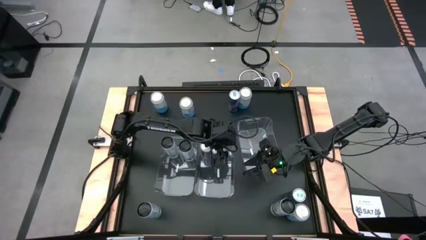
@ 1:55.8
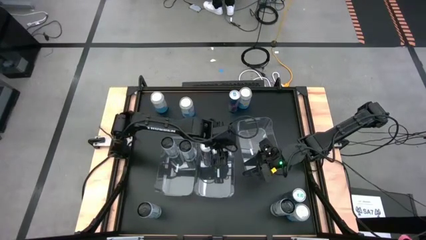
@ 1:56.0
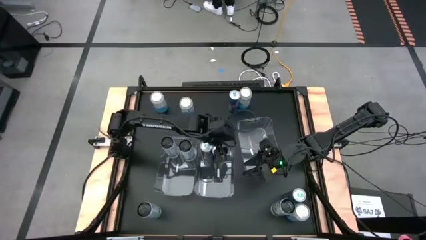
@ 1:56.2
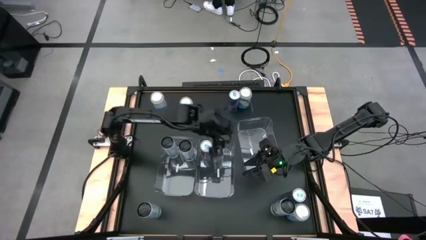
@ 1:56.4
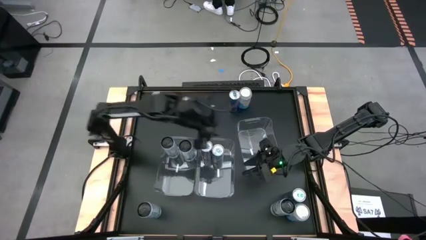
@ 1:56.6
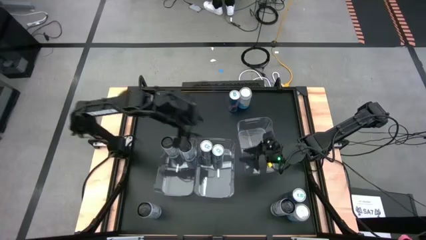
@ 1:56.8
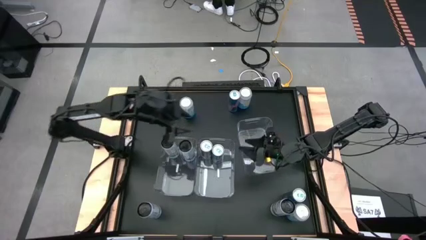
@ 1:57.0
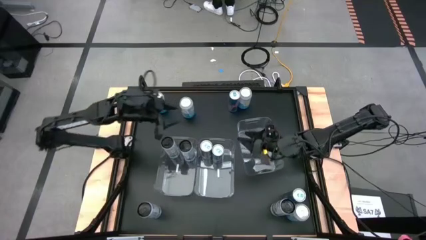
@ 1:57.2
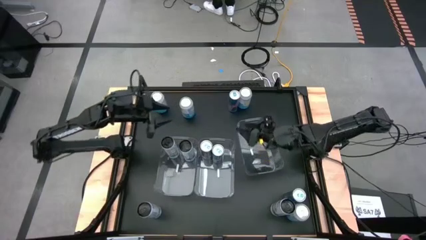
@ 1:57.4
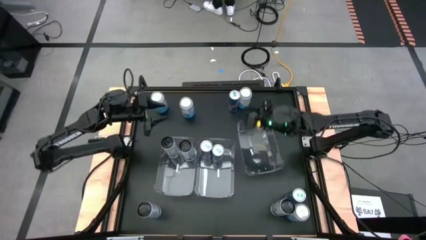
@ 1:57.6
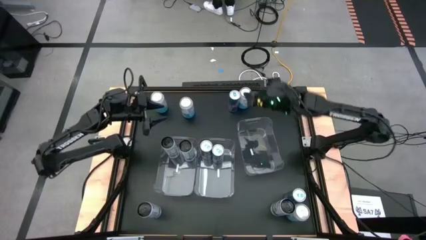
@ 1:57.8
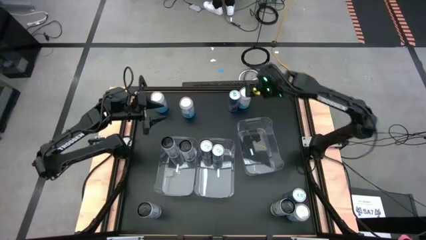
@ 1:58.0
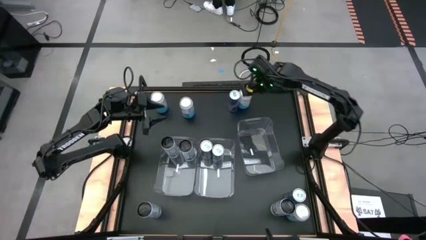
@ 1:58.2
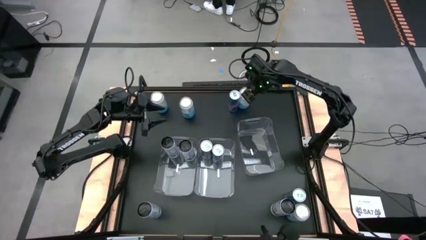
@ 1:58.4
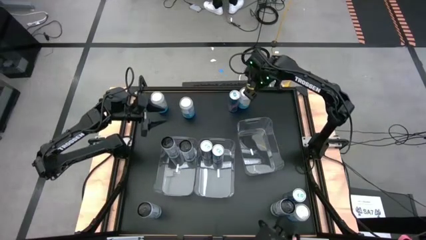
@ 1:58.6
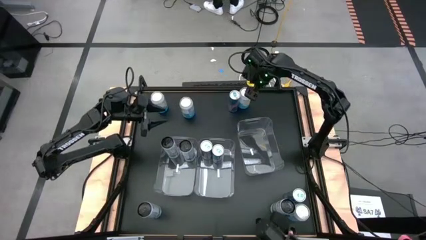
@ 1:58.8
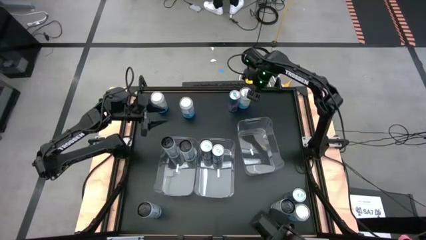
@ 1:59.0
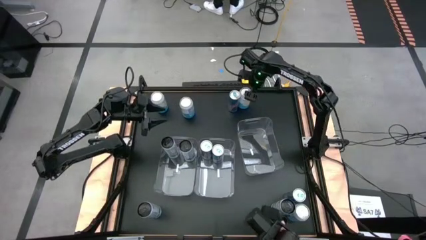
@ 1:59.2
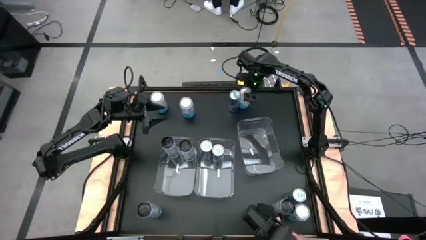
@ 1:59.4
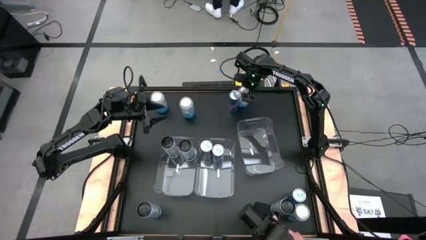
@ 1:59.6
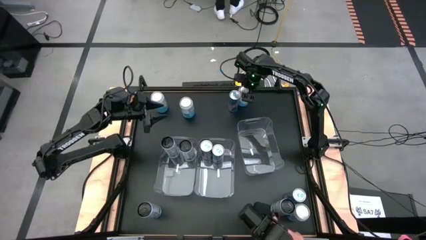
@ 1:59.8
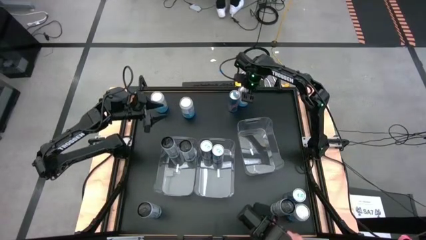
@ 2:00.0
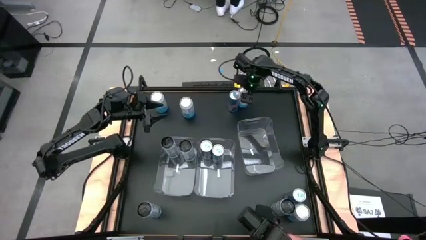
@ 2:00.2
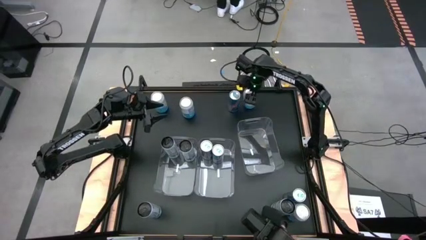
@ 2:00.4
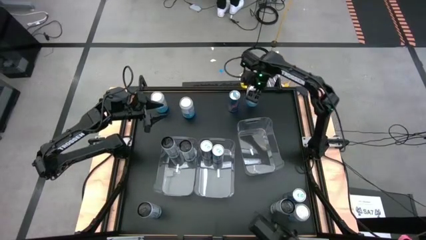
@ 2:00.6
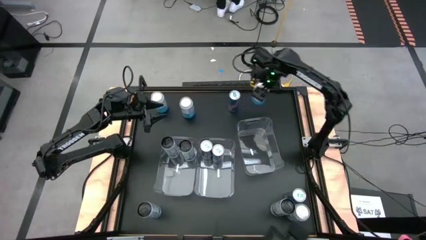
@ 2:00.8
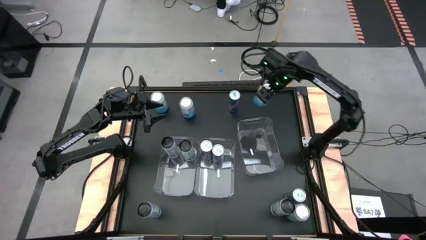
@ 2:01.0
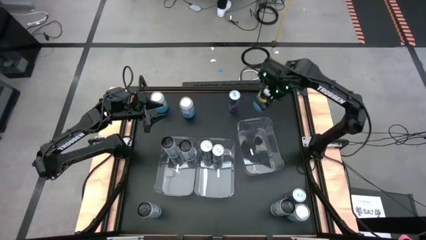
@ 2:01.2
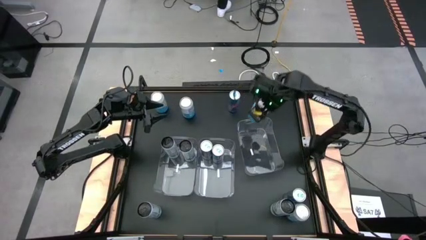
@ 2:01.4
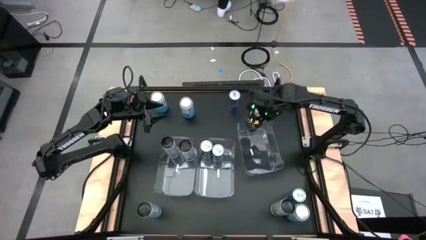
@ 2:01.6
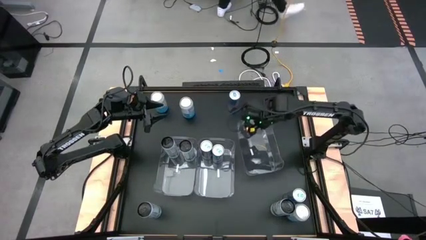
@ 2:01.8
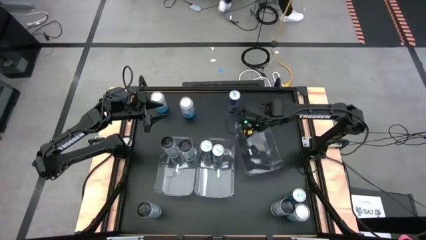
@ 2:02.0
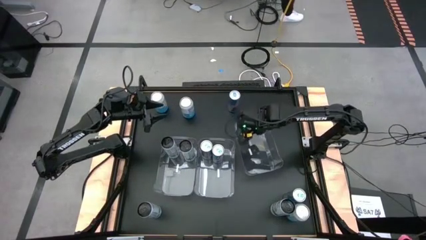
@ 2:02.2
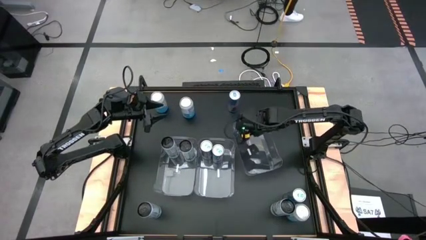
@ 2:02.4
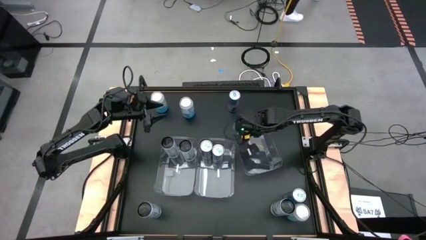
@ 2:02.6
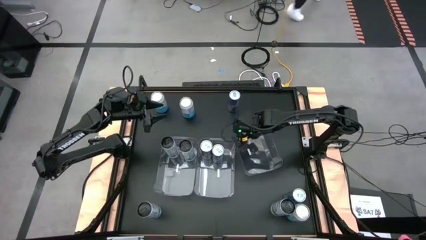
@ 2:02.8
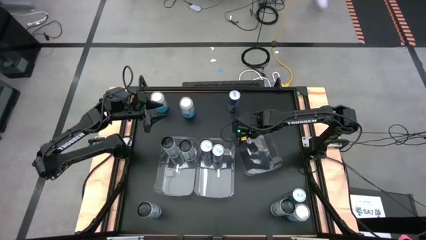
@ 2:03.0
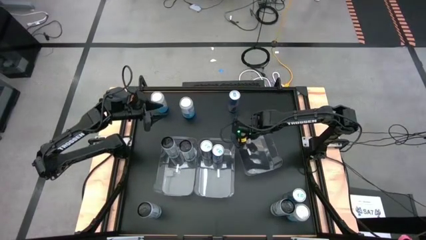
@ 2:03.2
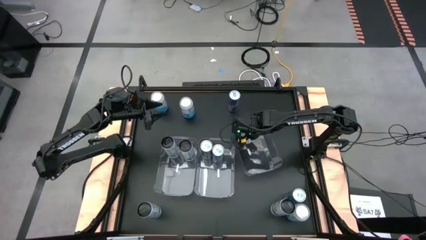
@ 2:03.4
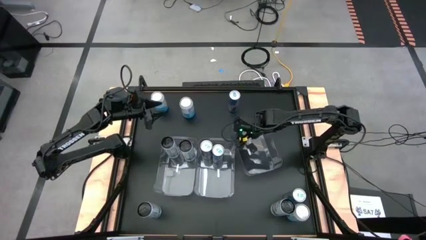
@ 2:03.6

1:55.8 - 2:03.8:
Task: Sort soda cans
Put the top right white and blue soda can into the right transparent bin

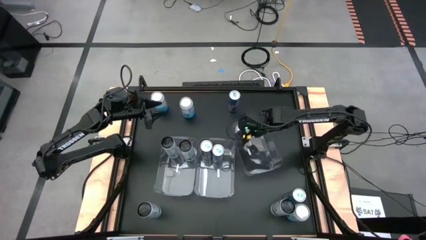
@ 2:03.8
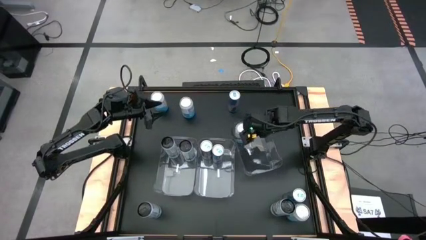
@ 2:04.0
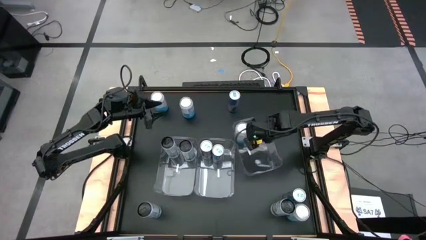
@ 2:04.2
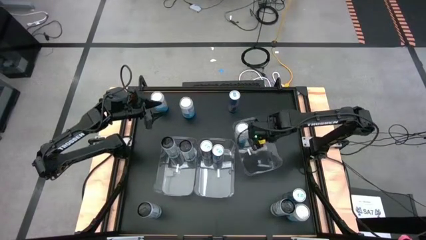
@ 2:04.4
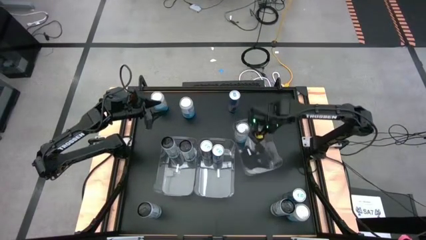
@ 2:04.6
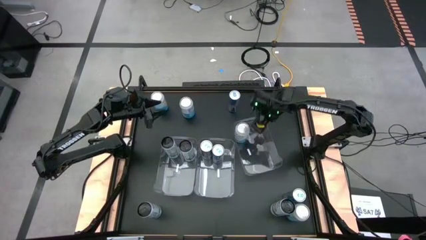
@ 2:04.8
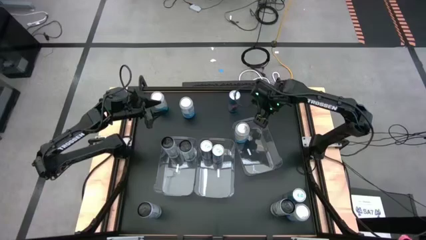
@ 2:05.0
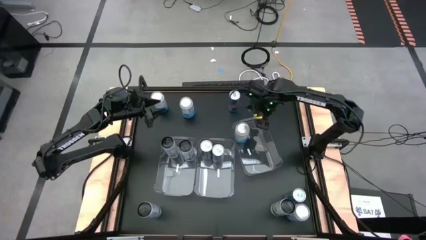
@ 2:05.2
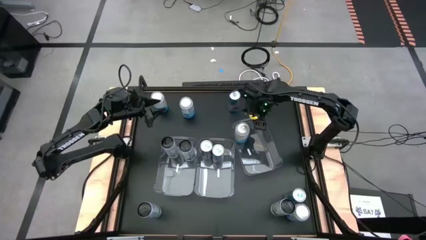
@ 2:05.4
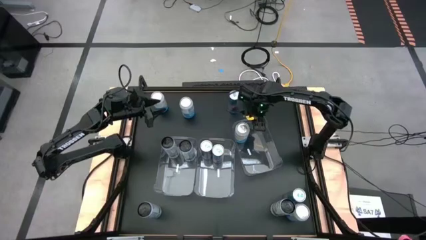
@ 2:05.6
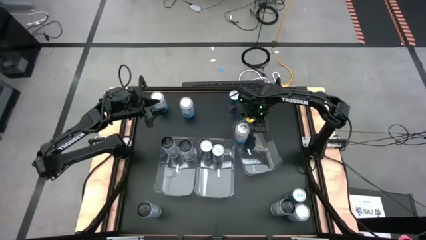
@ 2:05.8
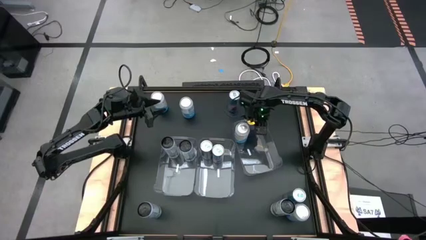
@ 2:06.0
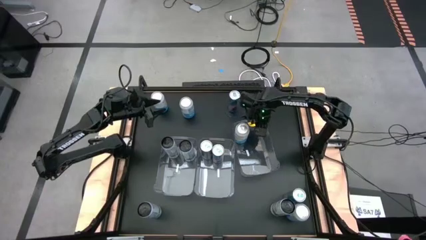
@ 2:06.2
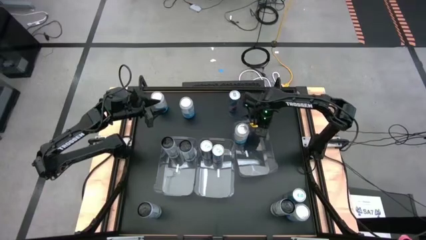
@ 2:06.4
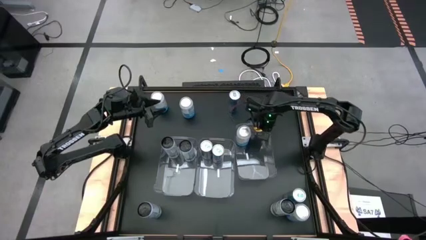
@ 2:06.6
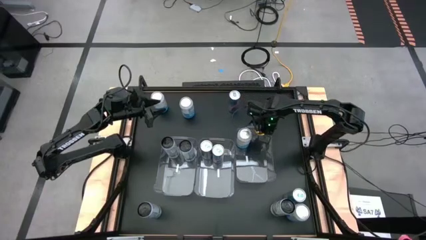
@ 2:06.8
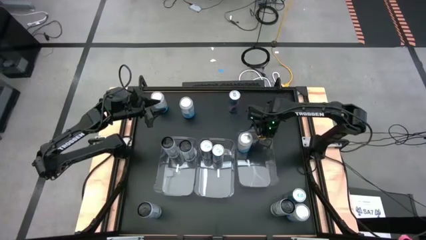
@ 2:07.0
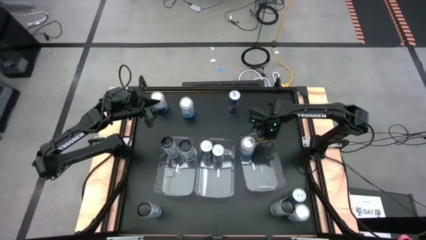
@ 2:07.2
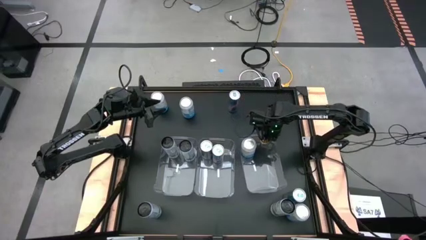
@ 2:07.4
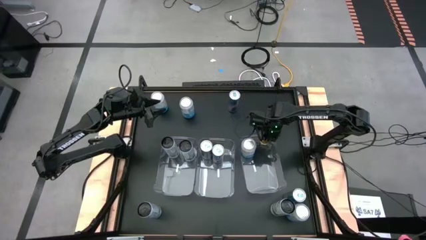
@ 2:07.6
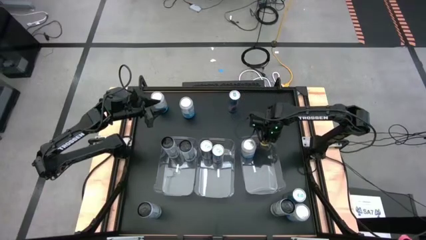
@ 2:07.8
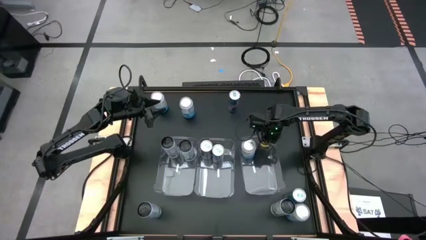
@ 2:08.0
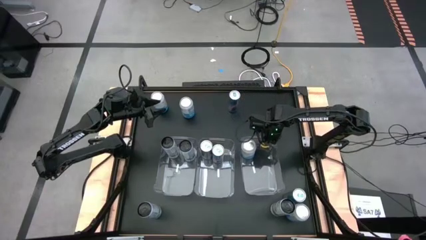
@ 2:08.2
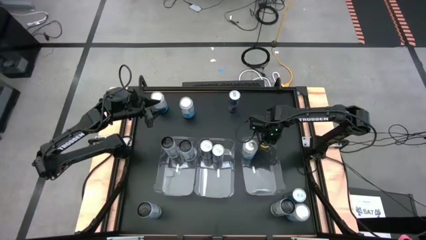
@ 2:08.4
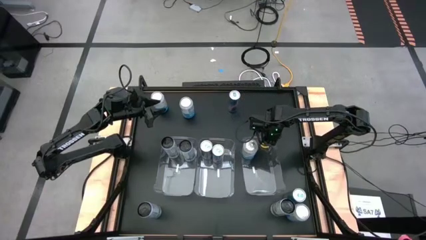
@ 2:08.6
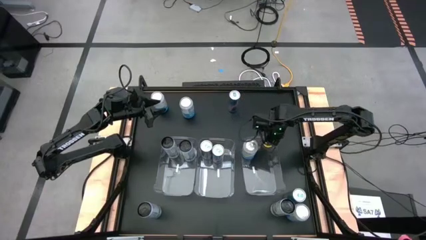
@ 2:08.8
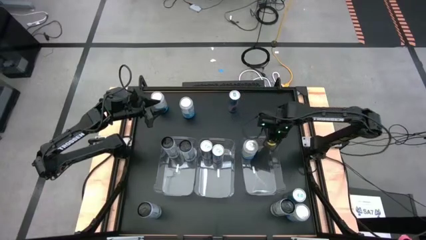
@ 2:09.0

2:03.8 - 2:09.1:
Adjust the right transparent bin

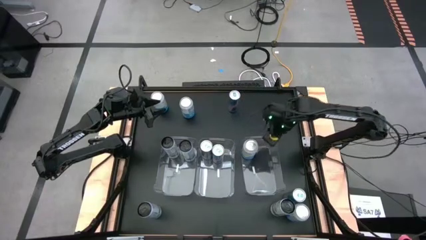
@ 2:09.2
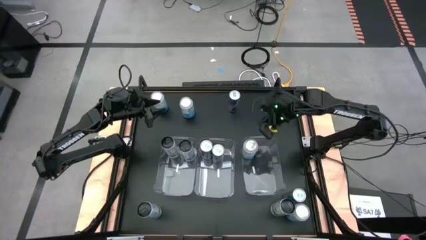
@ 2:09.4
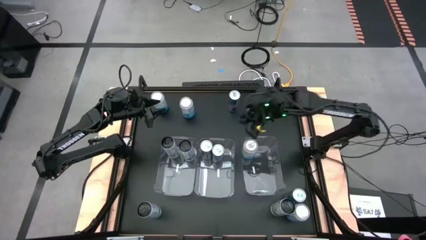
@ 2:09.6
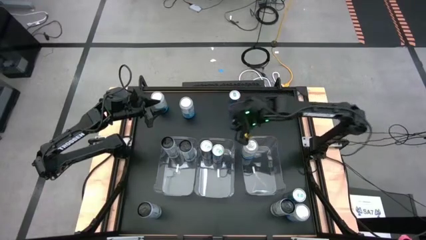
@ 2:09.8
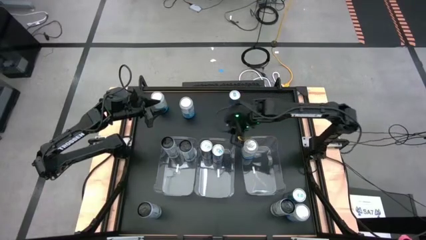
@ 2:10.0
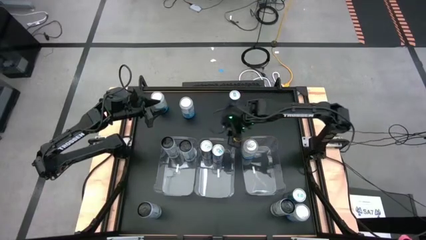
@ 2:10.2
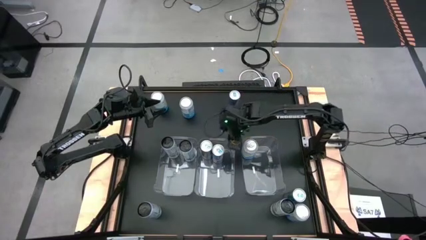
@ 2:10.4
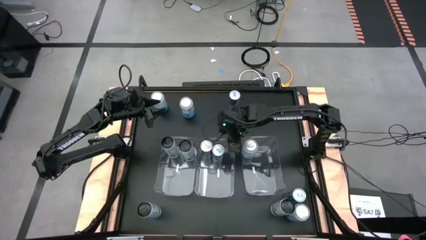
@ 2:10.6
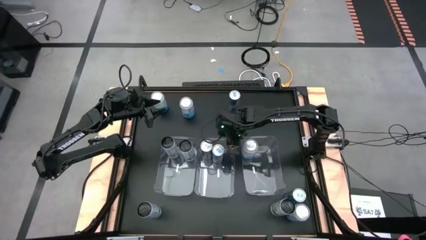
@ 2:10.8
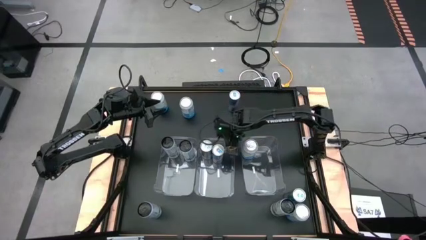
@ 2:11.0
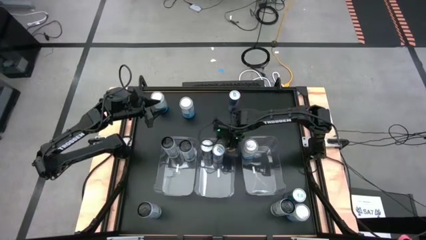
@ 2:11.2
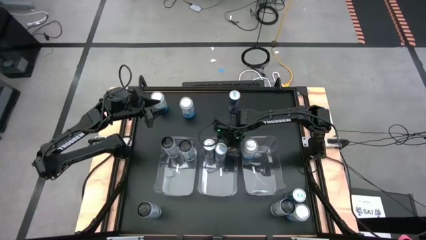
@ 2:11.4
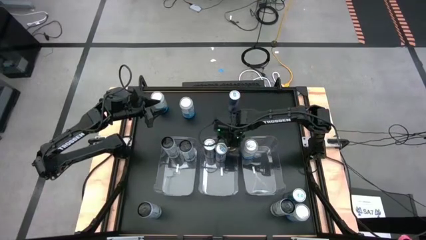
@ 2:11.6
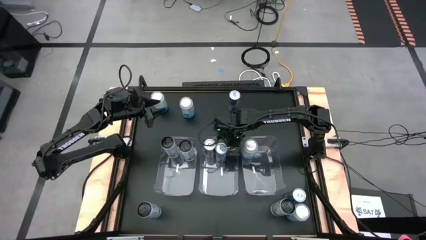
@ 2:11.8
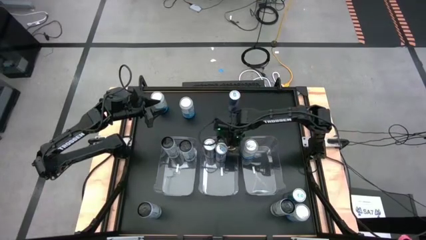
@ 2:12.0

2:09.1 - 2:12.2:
Adjust the middle transparent bin
